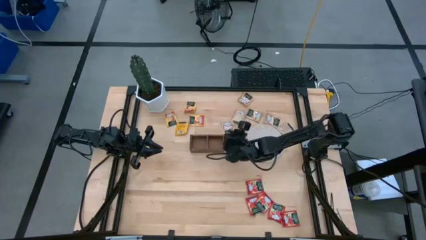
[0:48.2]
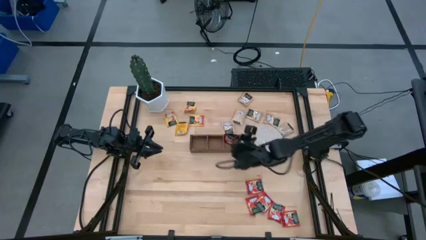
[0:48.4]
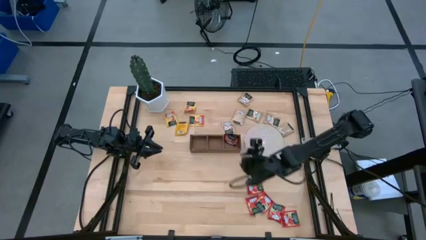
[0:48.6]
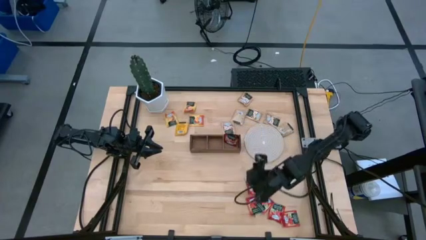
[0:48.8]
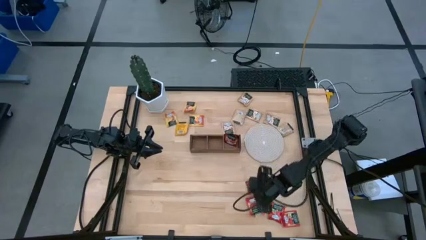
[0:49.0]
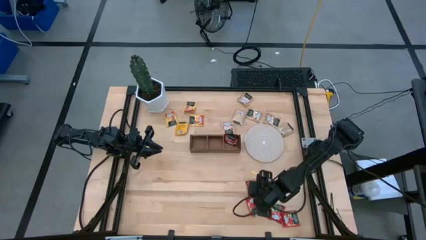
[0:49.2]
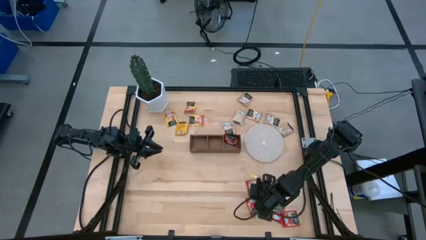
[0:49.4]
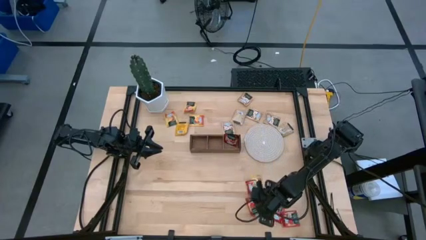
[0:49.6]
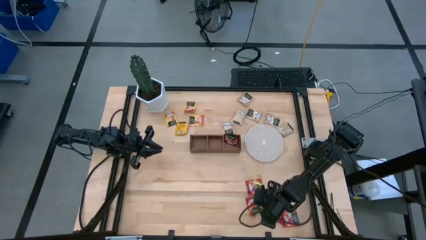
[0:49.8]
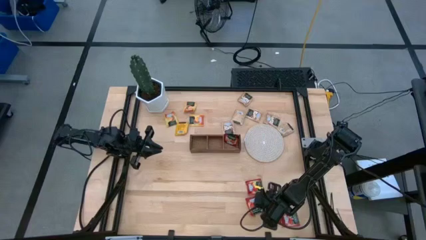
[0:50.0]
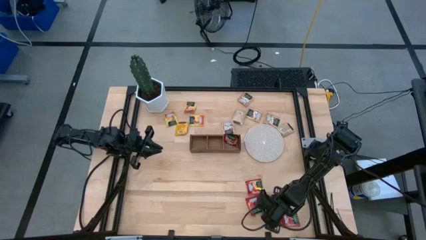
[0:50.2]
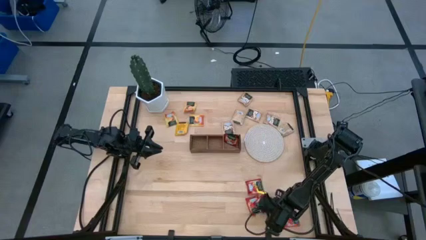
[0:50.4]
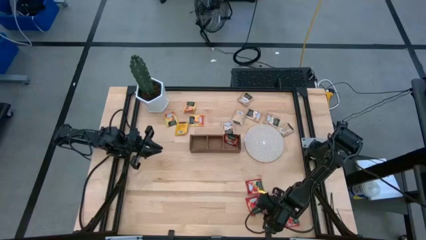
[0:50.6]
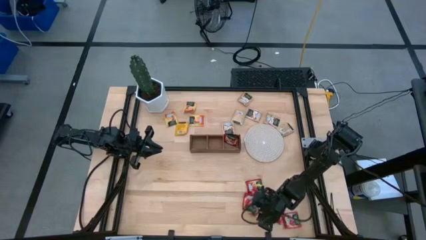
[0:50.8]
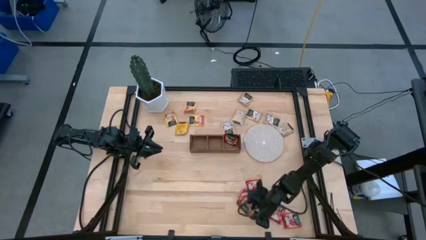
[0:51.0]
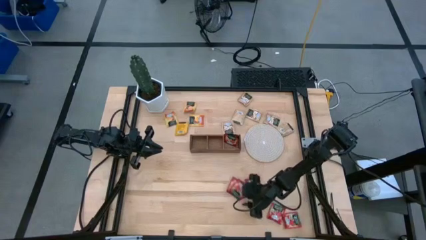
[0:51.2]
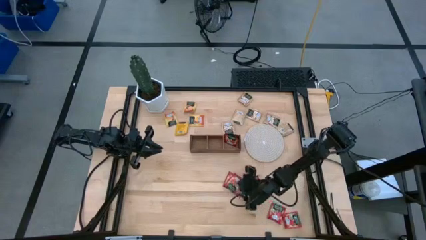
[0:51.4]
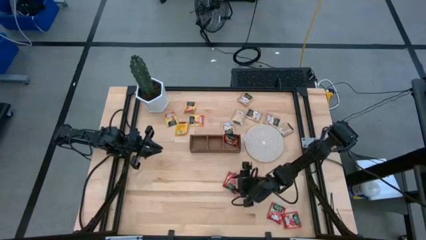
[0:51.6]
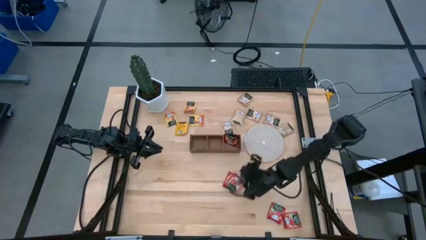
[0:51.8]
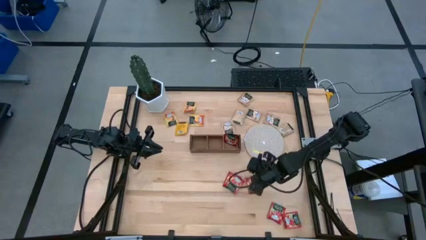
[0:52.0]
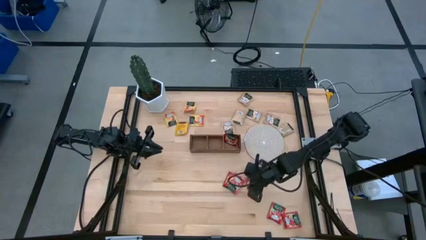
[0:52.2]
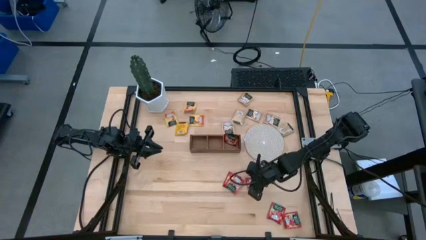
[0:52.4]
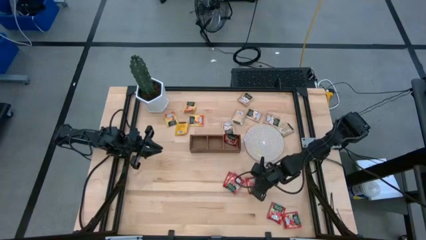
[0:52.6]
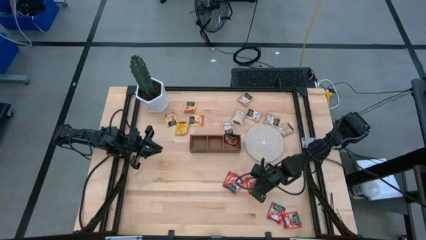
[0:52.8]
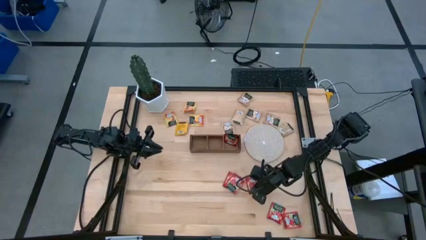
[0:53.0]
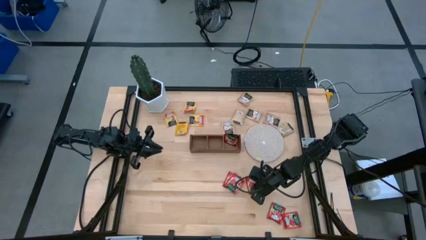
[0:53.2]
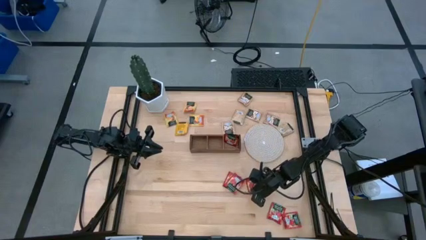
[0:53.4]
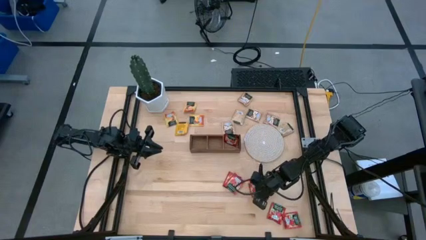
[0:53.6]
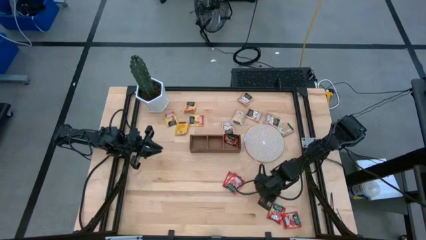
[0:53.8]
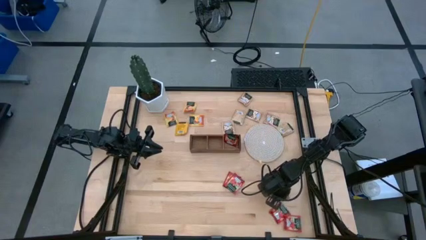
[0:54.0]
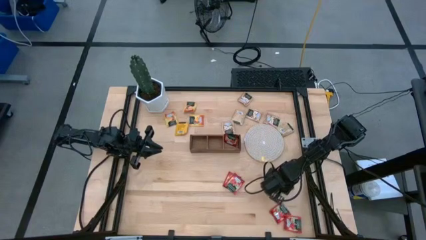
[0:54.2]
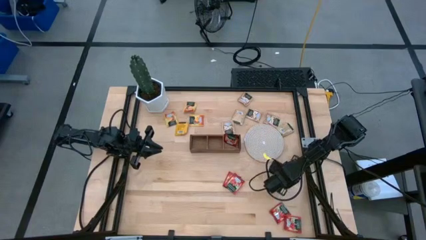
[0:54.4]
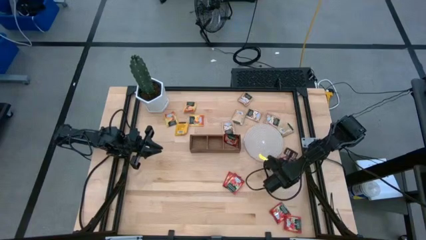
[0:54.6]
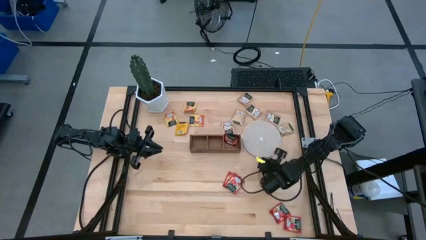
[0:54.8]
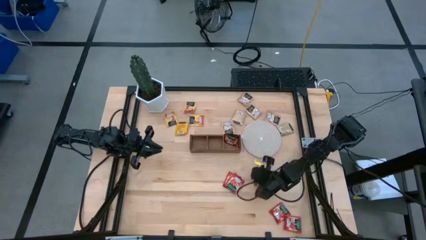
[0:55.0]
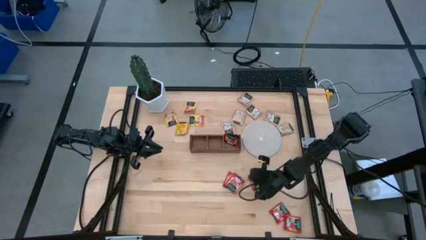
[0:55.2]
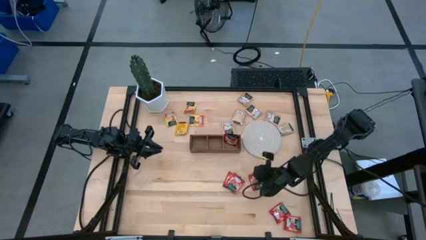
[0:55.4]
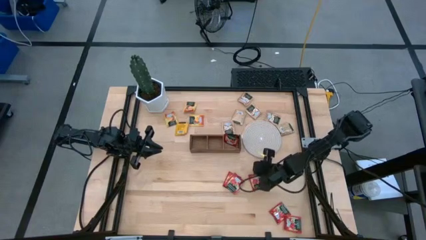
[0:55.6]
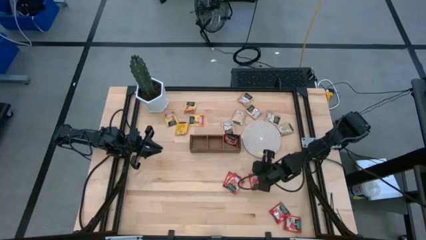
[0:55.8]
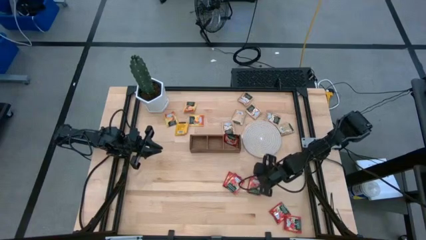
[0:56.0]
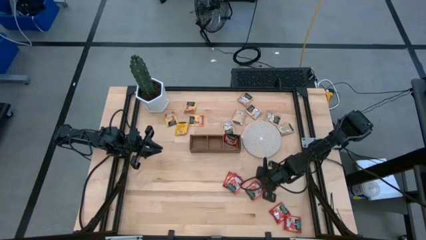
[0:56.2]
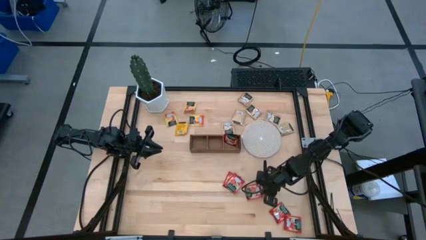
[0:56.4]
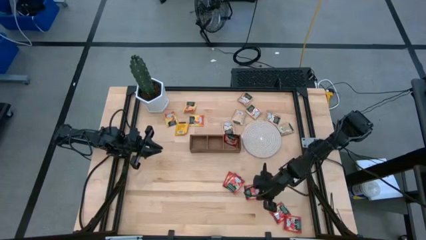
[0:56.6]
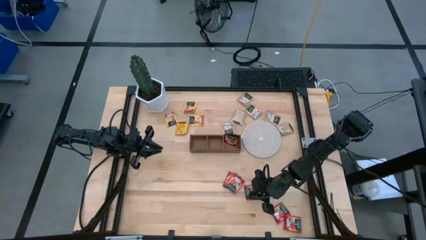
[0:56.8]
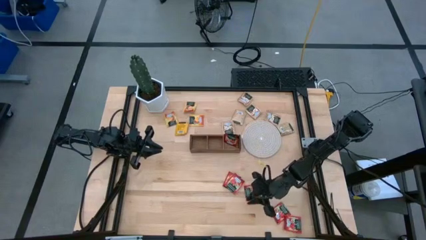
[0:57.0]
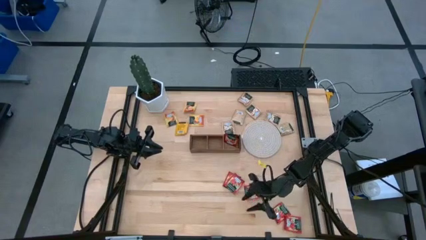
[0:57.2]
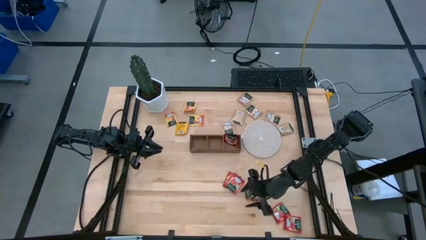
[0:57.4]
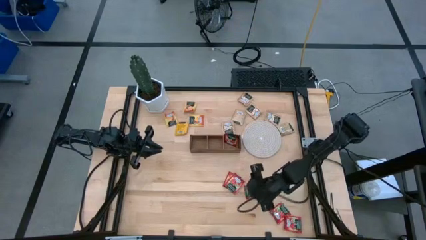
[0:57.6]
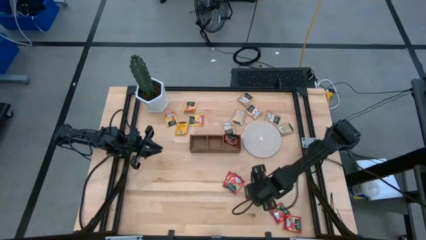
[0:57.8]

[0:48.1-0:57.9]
Task: Pick & Place Tea
Put the red tea bag into the right section of the wooden organizer

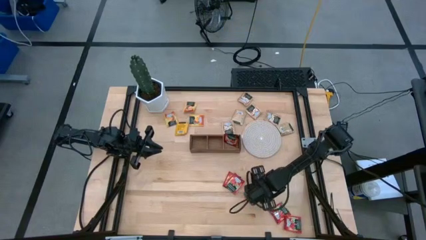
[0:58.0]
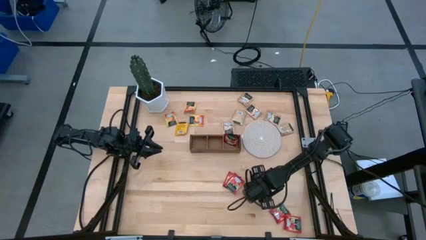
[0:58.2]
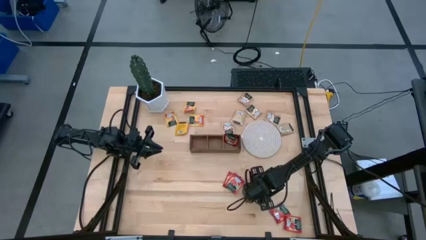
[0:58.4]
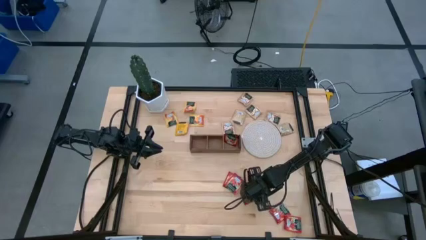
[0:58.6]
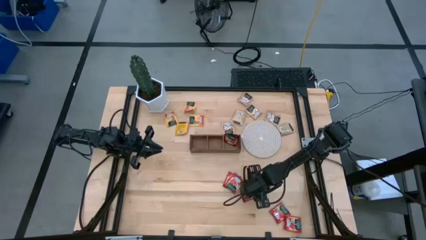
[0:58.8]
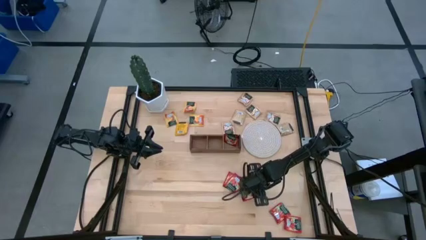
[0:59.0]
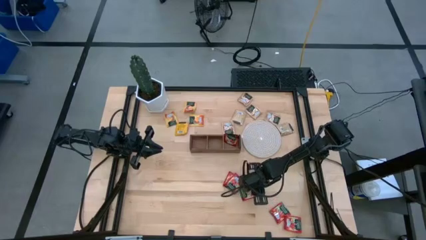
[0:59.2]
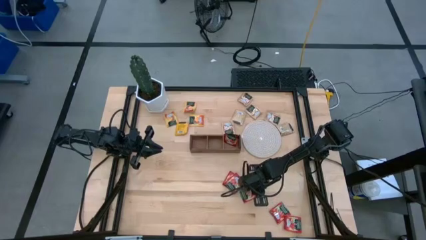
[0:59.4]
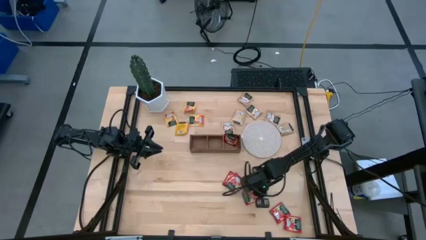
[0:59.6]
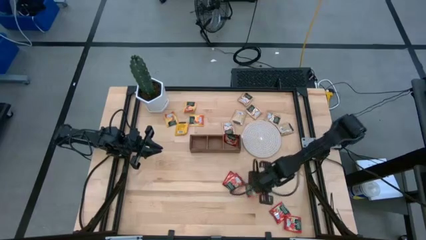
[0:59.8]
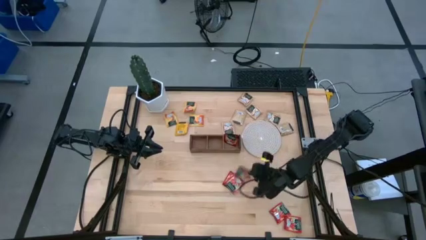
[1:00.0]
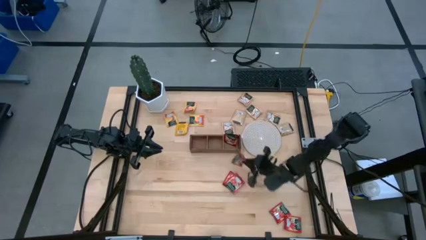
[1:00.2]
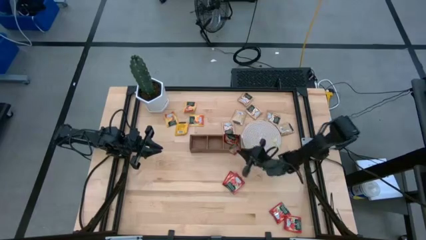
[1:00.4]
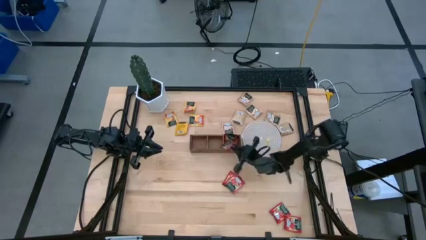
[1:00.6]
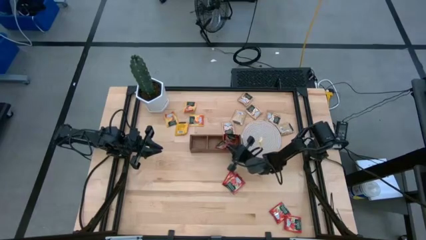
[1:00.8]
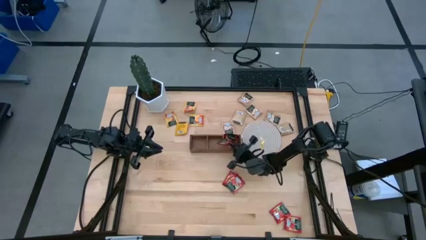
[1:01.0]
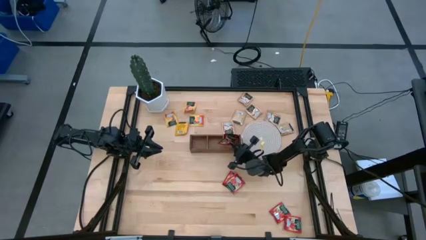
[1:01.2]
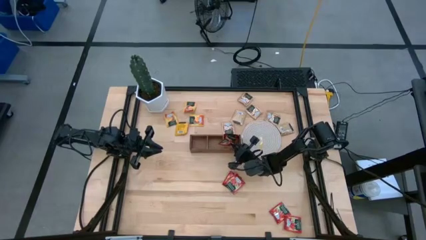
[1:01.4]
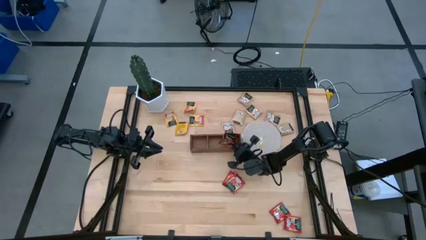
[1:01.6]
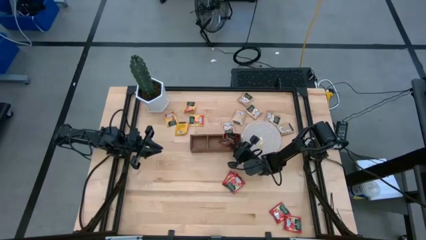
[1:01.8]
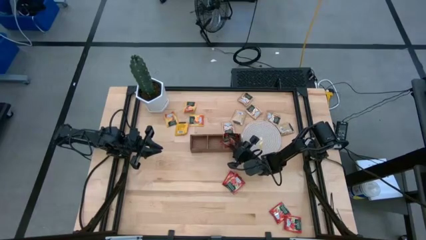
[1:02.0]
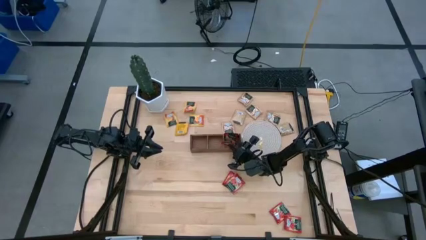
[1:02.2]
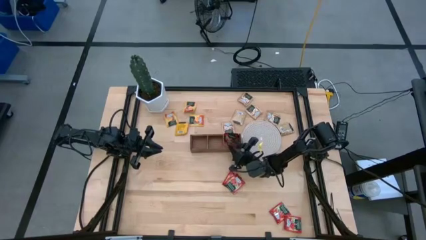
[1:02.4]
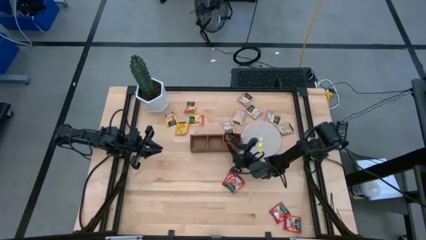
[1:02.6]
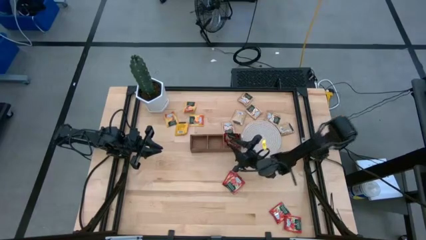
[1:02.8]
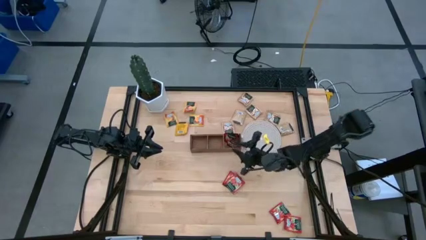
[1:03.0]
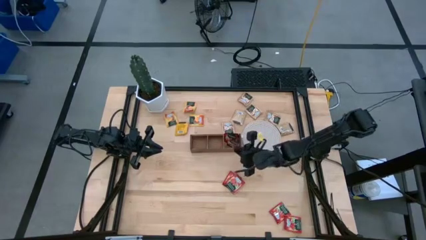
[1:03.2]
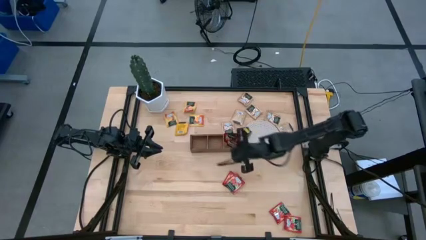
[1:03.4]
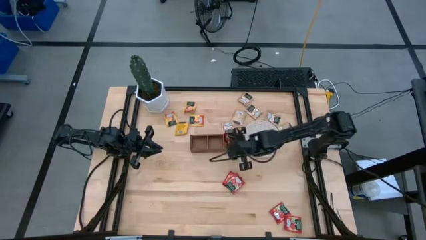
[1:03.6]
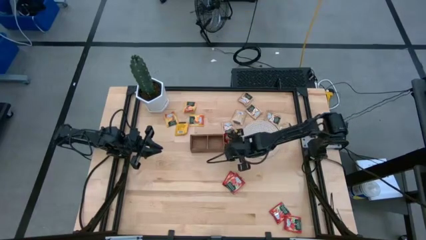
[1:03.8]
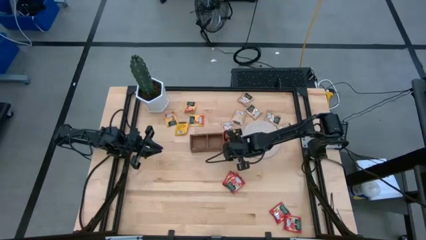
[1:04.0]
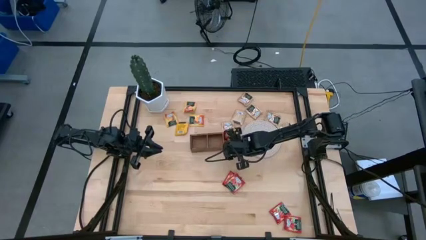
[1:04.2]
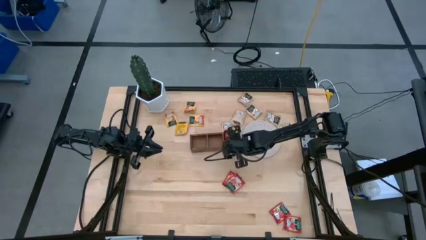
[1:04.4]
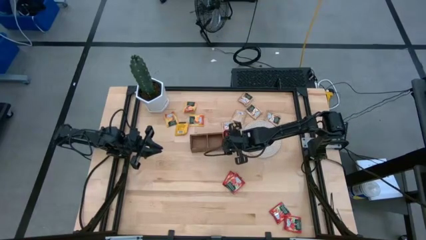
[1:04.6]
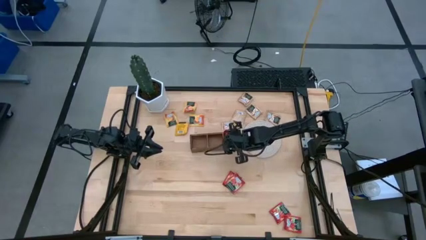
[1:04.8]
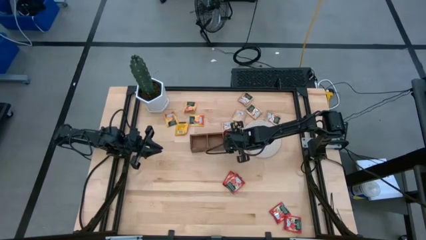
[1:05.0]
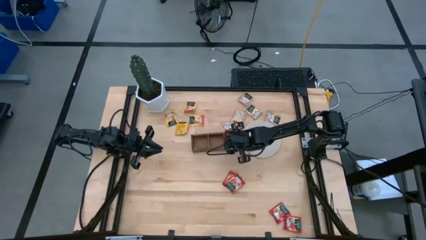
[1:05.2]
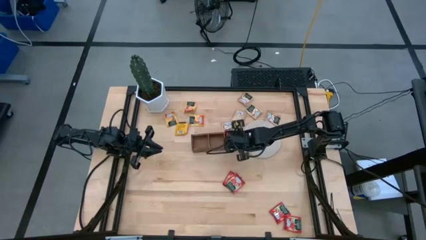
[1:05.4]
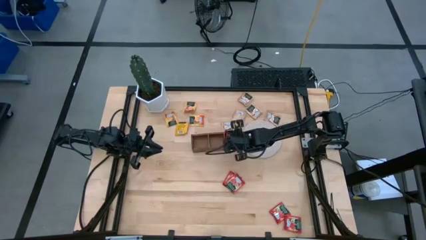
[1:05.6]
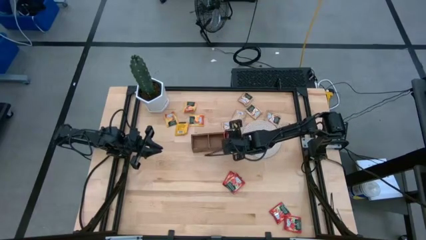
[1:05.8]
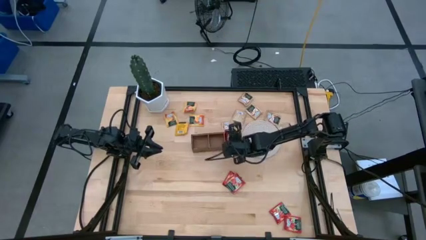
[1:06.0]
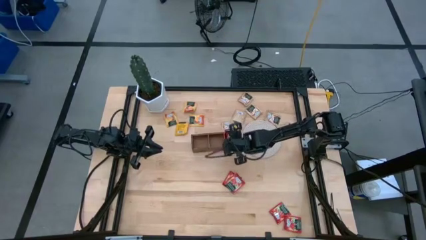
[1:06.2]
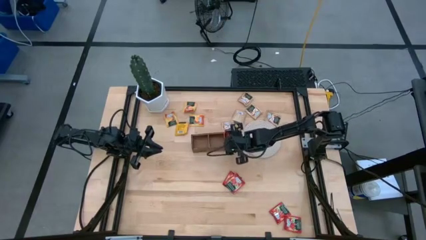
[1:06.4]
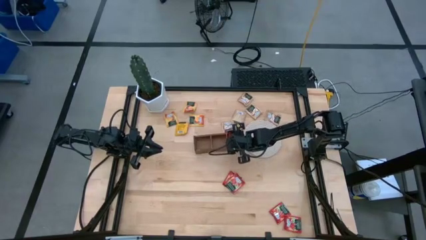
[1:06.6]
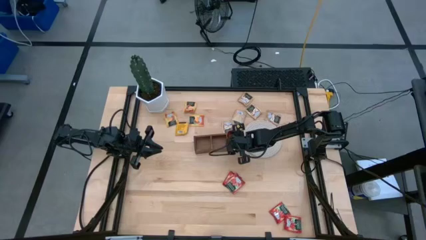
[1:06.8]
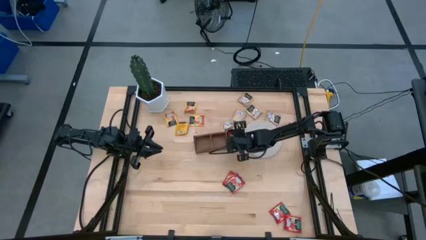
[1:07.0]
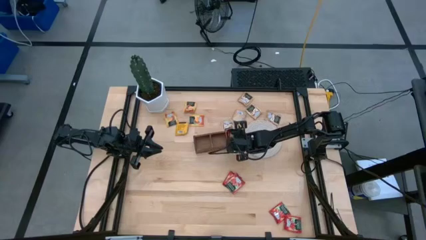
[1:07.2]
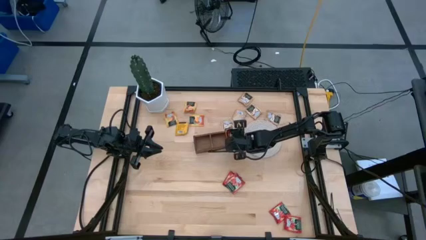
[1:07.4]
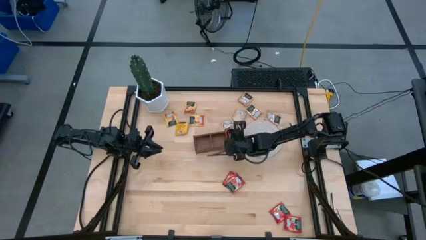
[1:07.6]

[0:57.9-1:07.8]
Put the red tea bag into the right section of the wooden organizer
